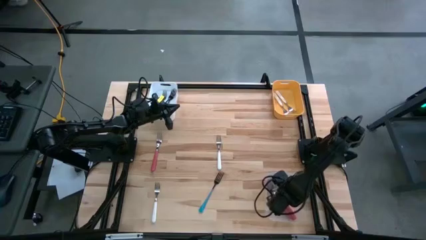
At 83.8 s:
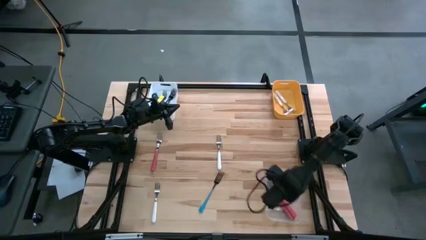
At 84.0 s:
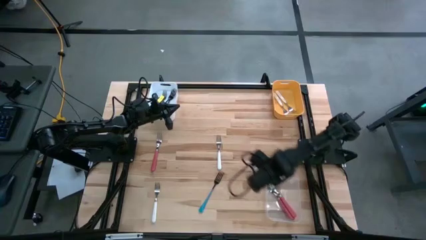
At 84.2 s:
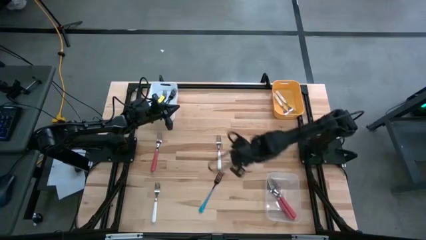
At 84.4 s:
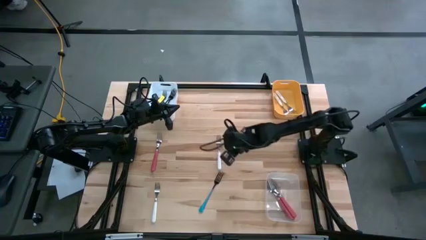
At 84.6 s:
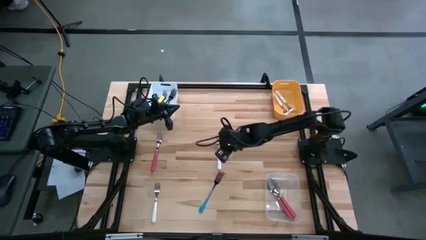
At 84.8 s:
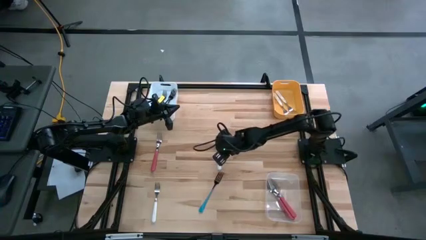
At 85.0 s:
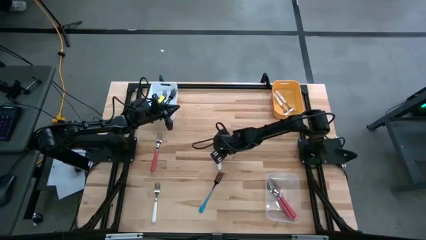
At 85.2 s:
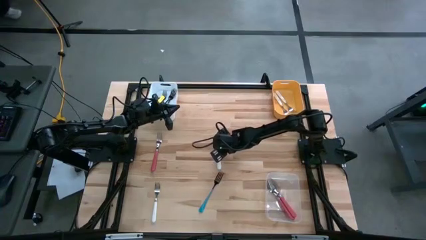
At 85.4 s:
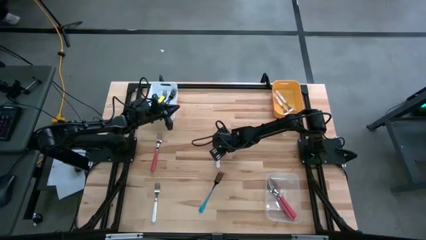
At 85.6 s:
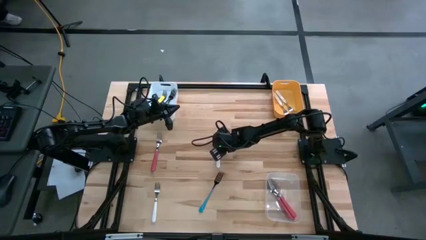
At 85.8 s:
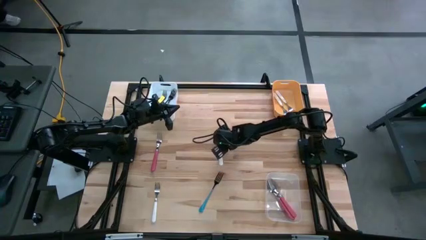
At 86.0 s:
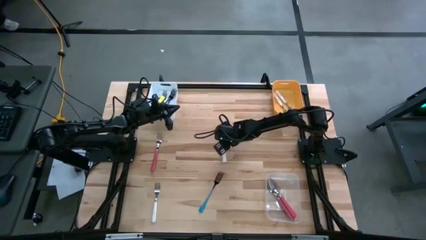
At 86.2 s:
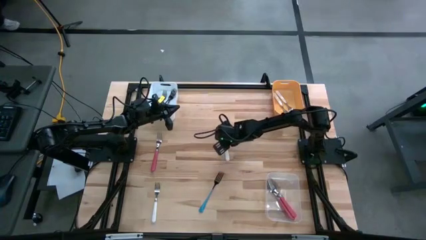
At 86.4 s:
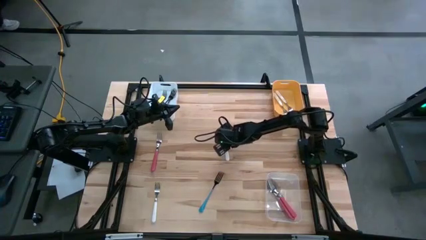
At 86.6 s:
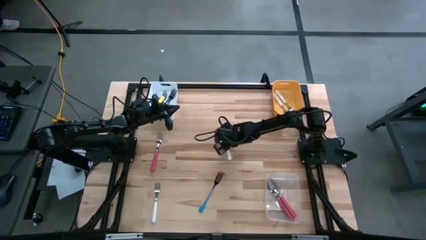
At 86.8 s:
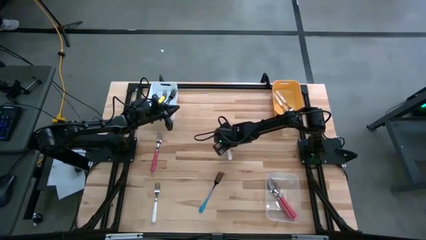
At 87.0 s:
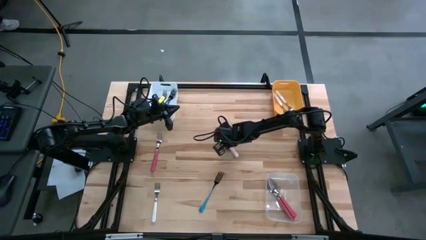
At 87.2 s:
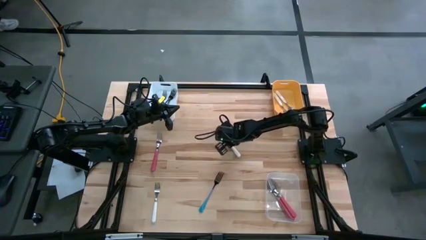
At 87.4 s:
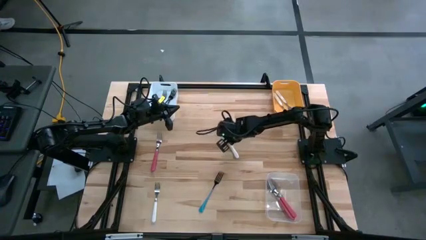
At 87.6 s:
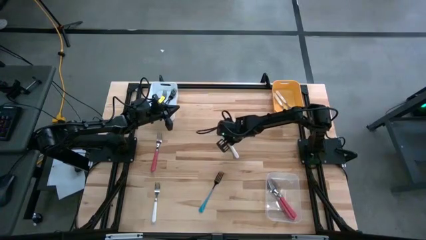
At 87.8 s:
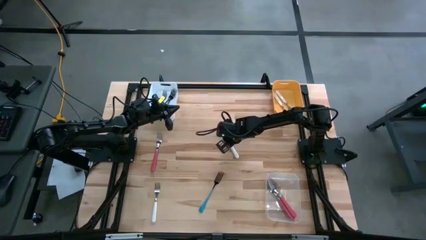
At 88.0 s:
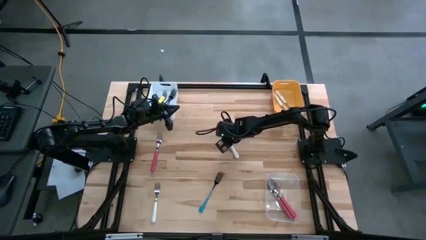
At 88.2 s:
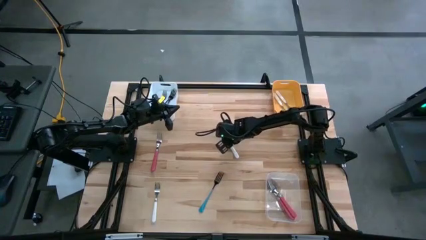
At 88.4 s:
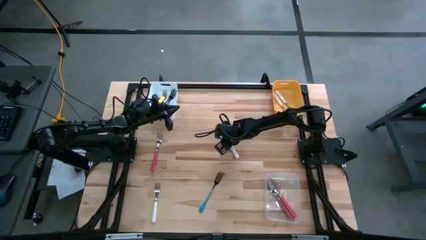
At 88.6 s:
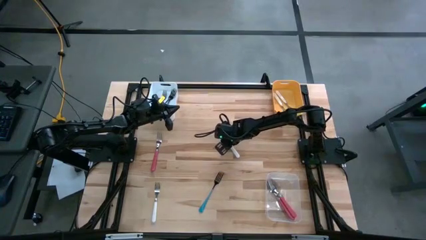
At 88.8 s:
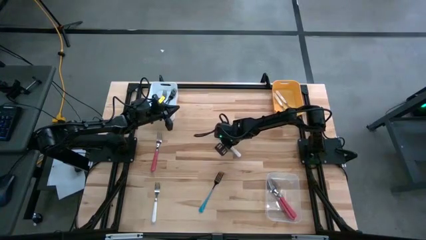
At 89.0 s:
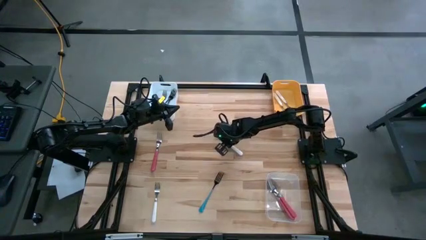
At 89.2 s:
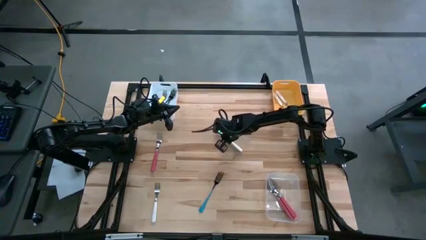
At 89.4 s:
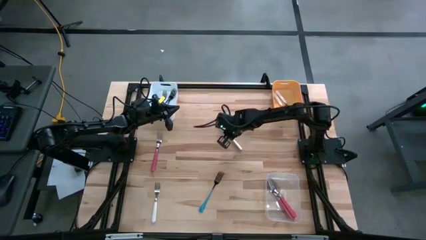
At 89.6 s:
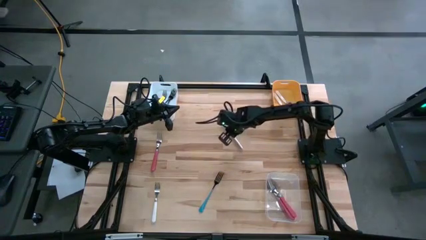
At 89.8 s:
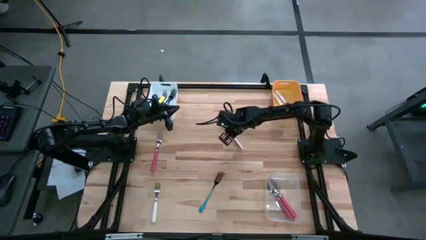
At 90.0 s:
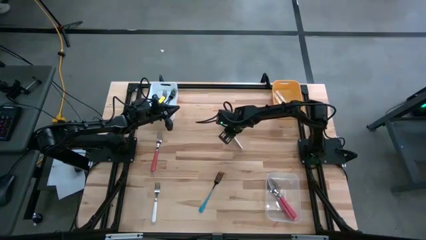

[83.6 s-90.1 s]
Task: Sort silverware by color (type)
Put the top white fork into the yellow bin

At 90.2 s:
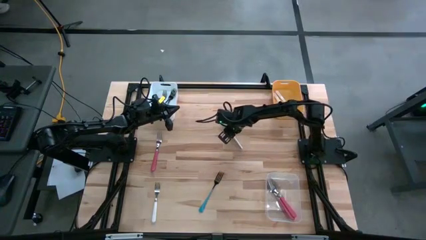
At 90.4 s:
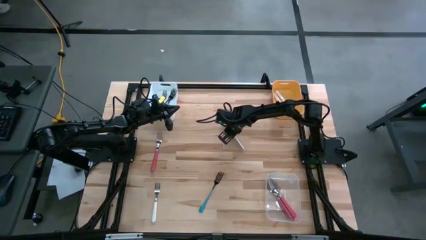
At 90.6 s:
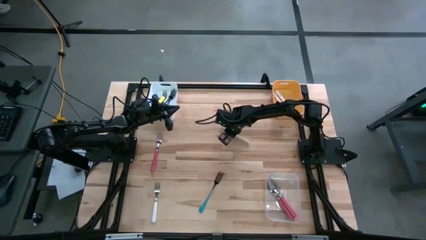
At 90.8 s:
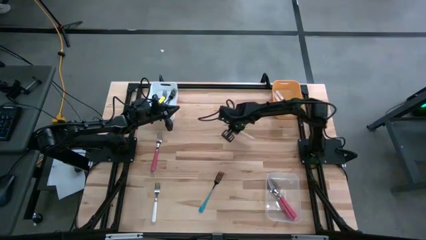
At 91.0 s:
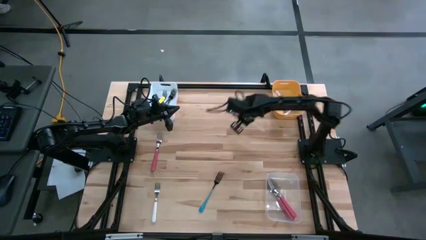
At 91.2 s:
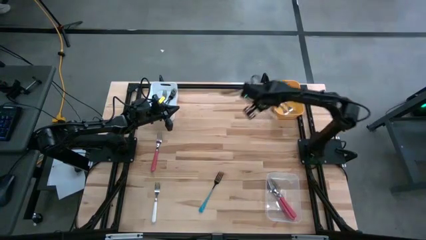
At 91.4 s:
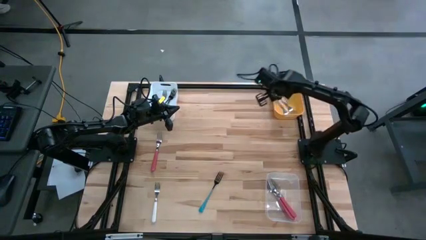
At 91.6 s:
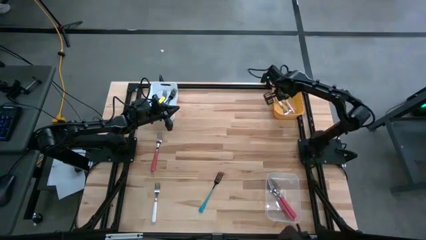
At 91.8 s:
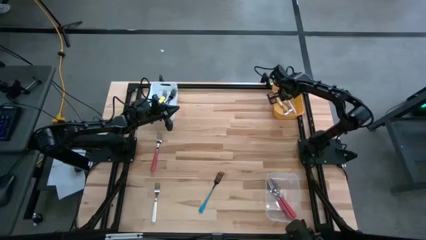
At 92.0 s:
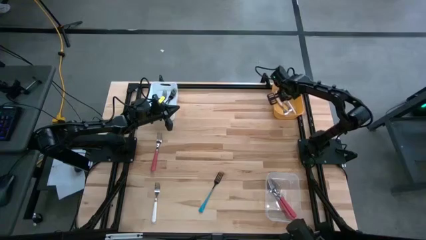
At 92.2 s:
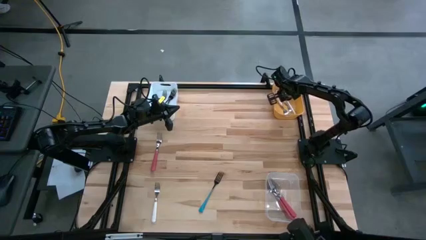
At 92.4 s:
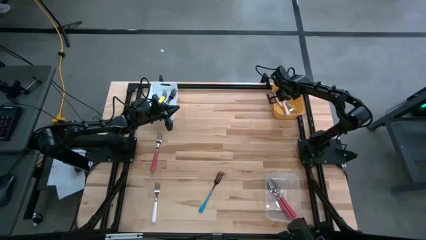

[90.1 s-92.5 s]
Put the top white fork into the yellow bin

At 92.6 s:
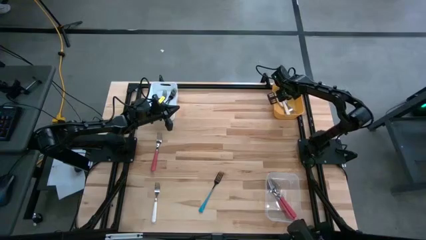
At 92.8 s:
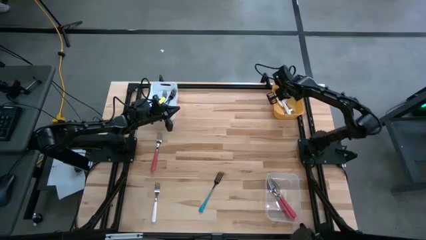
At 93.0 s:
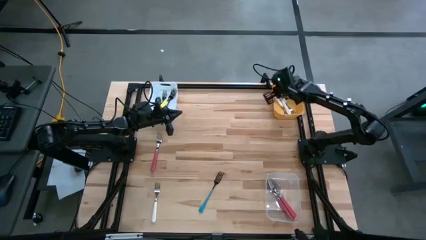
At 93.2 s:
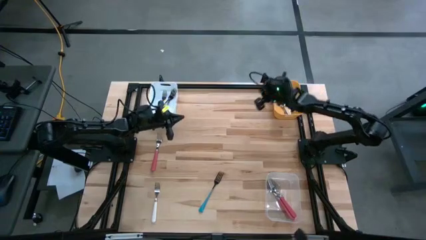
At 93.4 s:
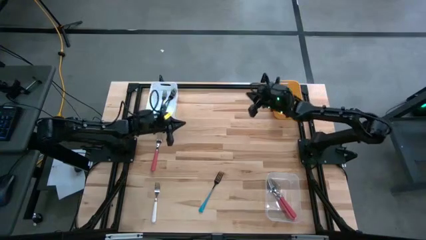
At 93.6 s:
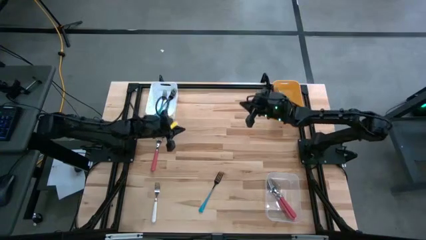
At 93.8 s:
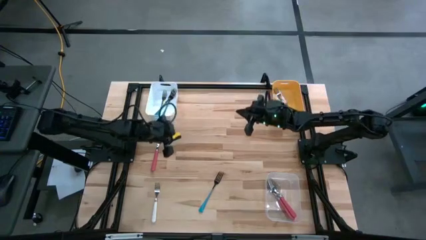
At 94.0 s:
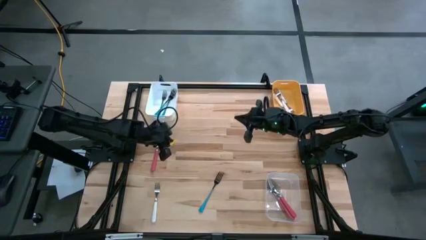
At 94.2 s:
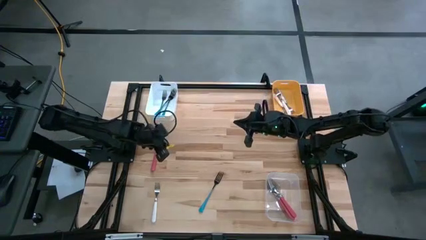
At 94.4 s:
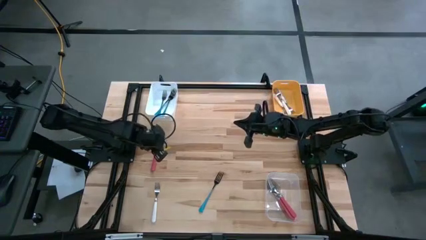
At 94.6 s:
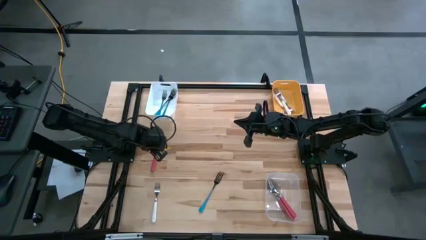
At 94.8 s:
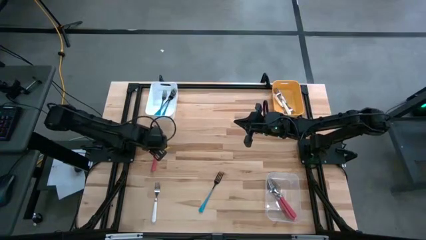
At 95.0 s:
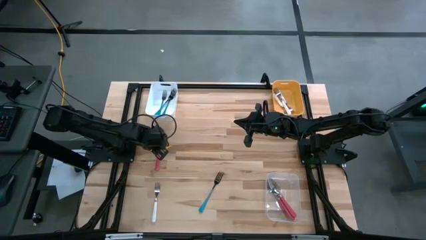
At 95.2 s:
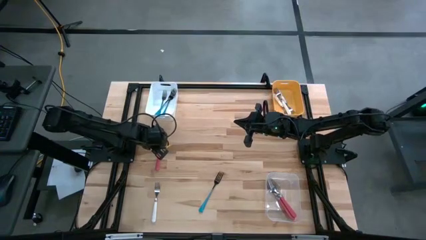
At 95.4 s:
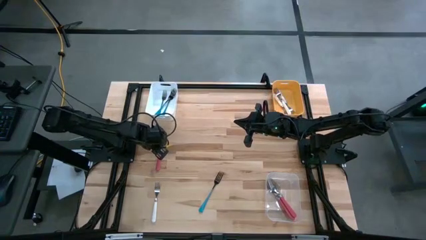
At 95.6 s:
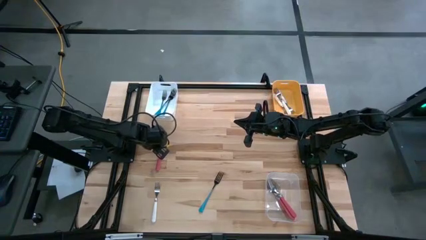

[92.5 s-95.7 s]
Put the light red fork into the transparent bin

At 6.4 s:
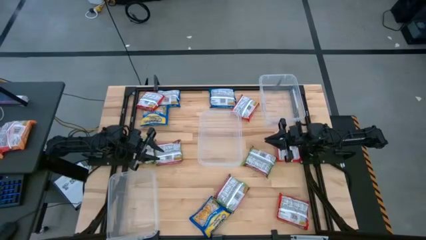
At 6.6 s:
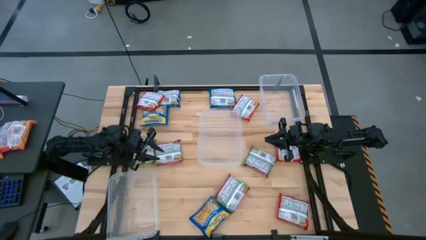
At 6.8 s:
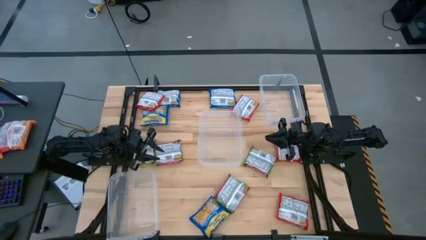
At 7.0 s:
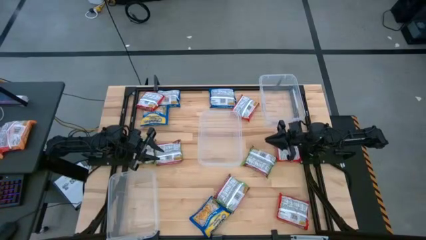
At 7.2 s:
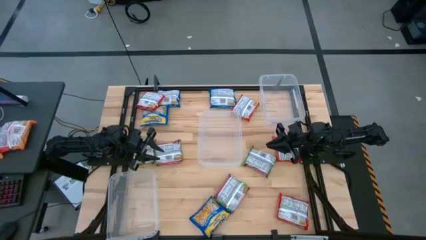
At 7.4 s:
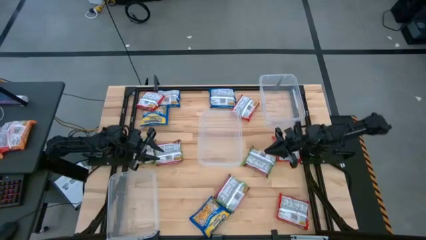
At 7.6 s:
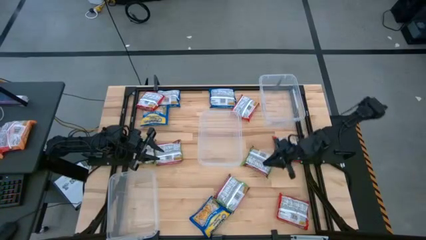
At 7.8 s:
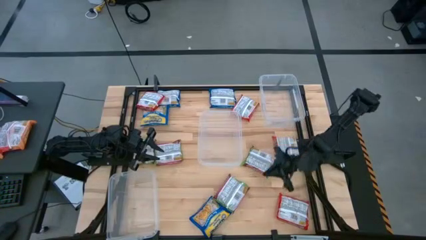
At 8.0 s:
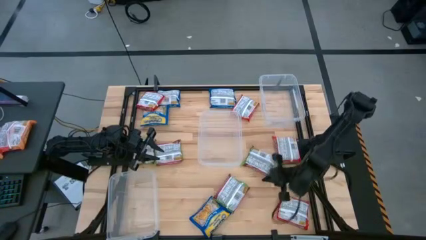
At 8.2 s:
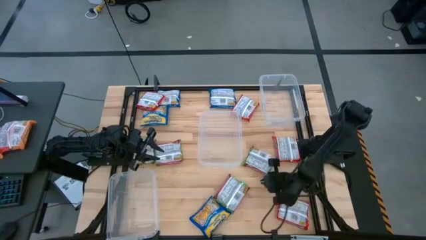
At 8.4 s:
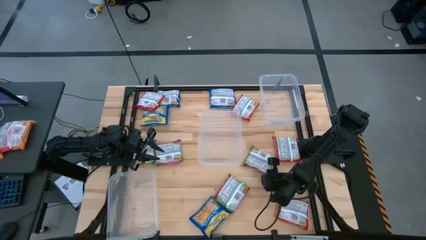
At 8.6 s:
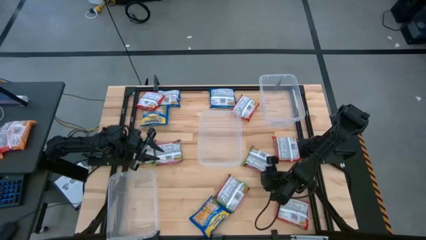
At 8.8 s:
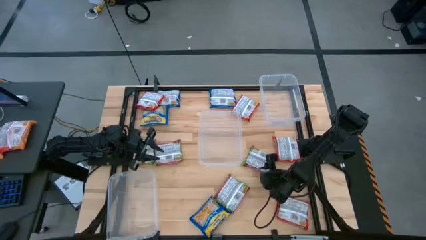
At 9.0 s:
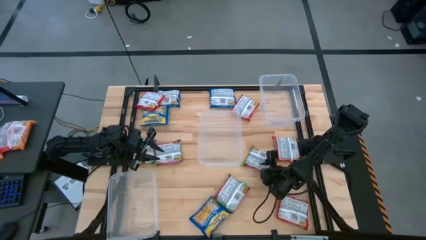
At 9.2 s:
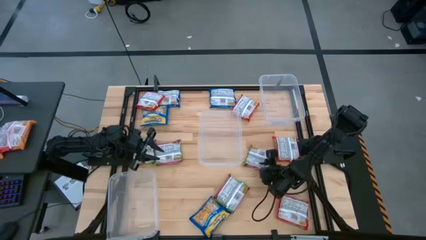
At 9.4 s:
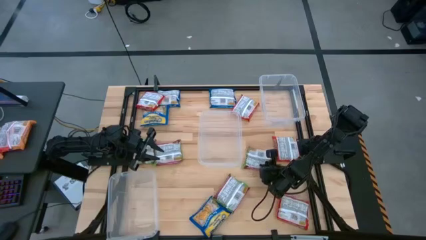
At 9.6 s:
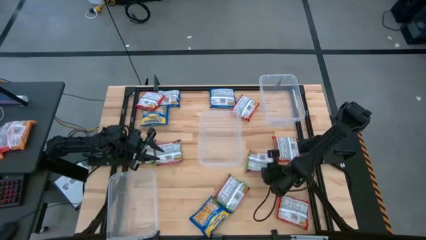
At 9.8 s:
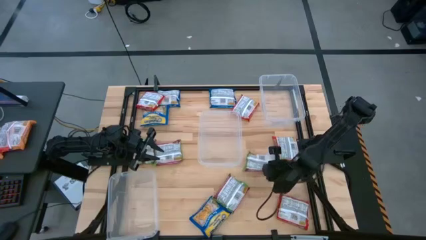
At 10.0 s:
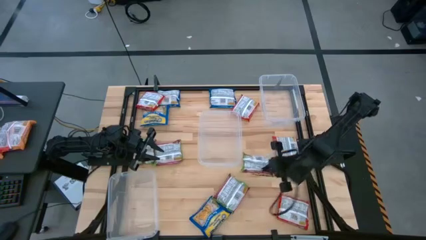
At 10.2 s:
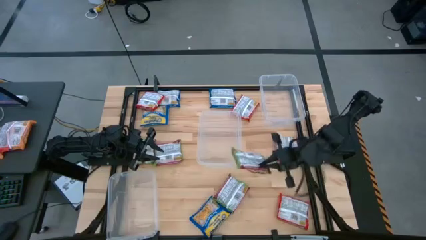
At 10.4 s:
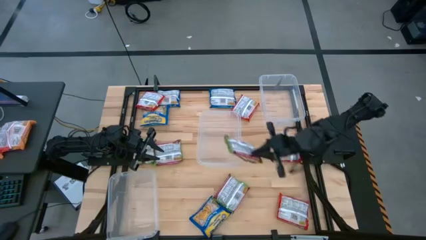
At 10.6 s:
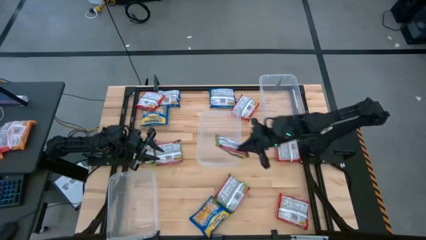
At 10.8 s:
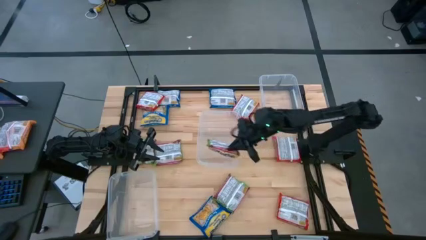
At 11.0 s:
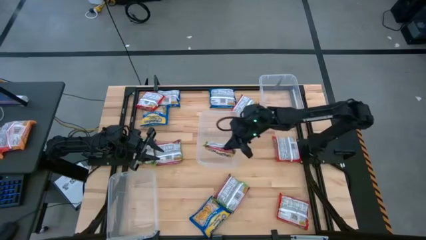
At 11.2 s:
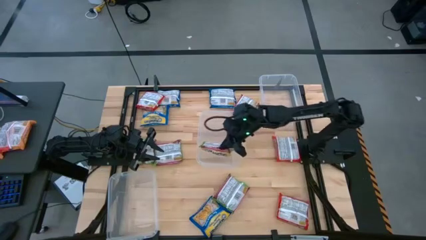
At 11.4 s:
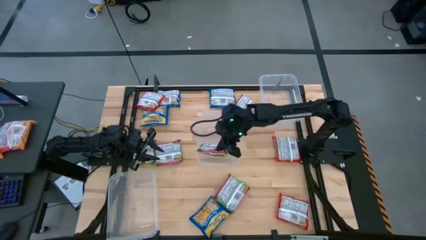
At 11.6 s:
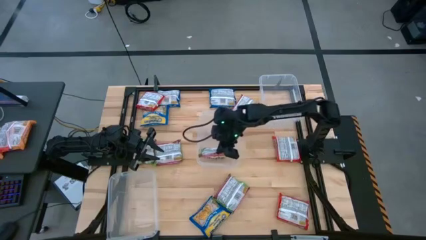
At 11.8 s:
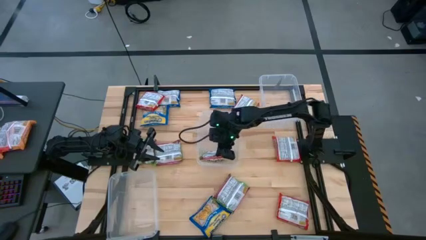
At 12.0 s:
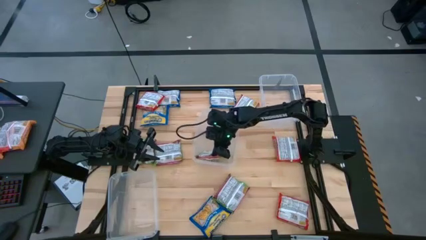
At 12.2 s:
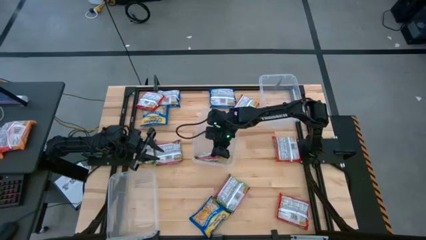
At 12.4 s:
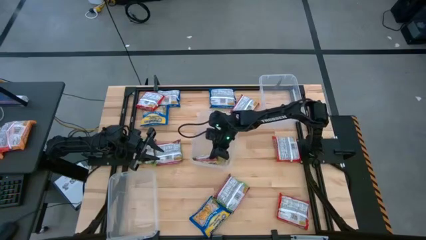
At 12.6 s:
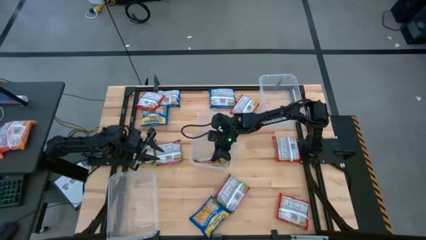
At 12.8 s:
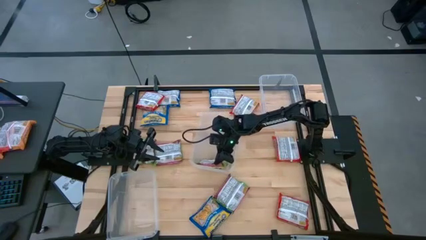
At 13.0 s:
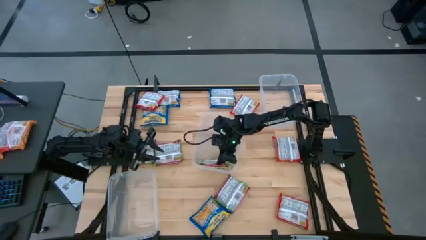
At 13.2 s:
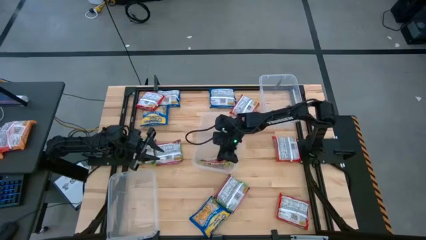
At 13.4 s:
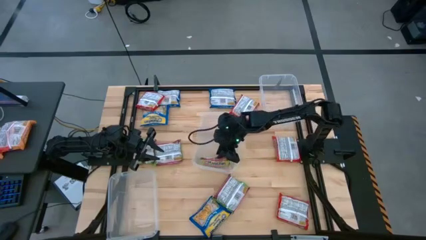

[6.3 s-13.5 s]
Task: Sort Maruchan noodles
Put the green noodle pack into the middle transparent container
